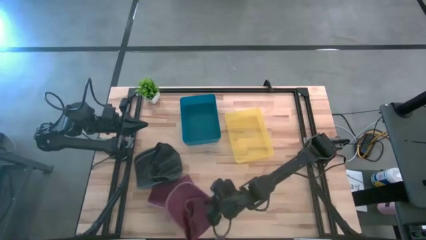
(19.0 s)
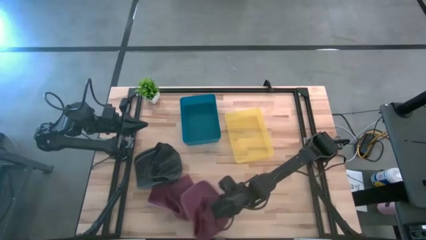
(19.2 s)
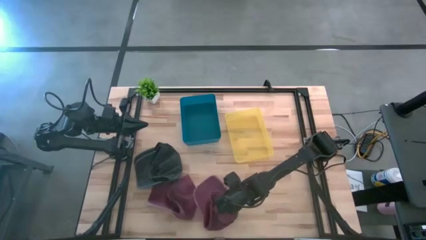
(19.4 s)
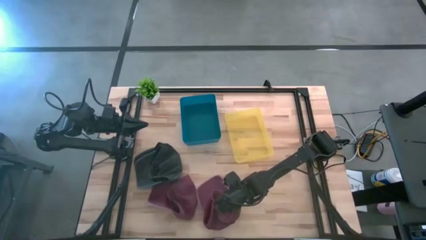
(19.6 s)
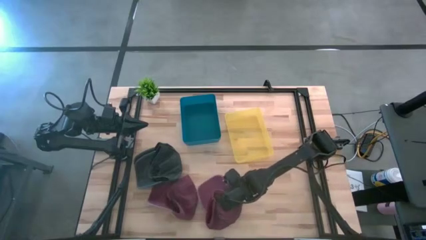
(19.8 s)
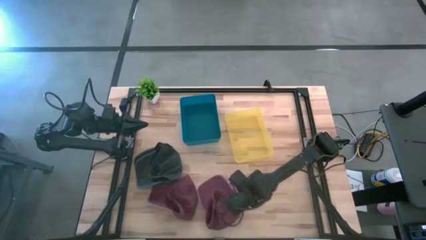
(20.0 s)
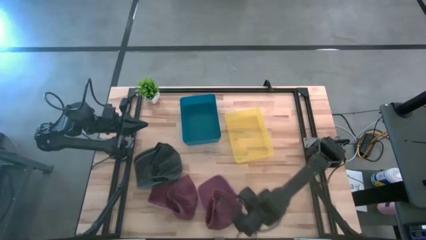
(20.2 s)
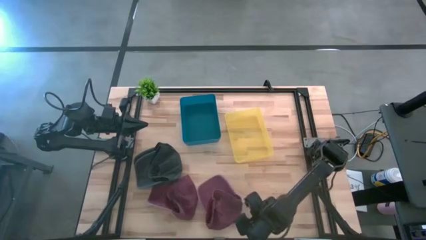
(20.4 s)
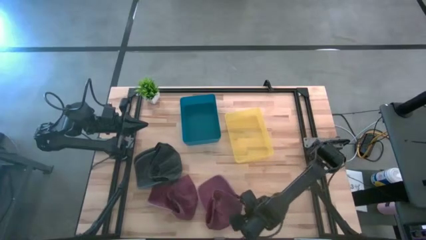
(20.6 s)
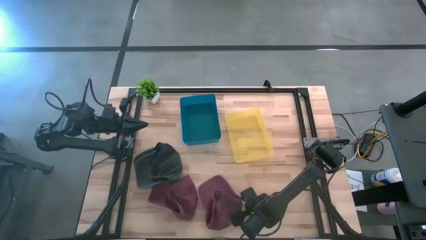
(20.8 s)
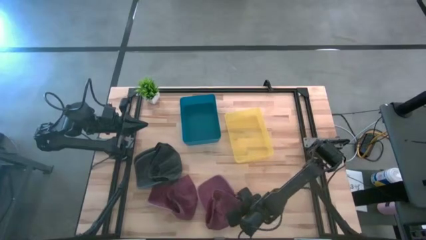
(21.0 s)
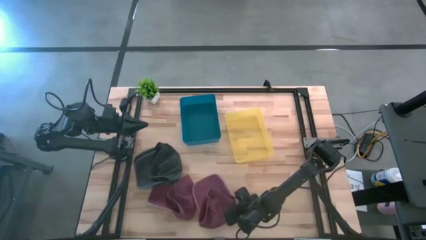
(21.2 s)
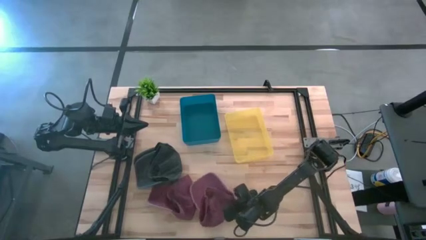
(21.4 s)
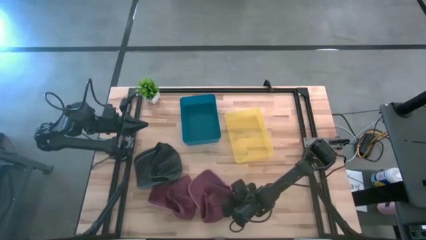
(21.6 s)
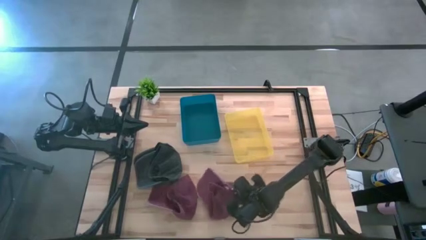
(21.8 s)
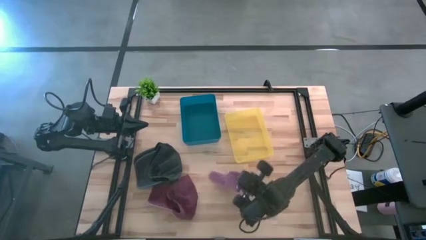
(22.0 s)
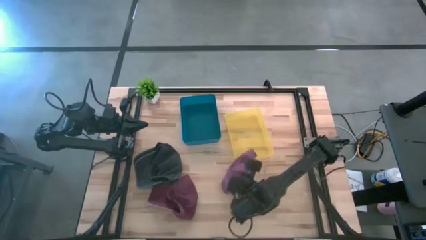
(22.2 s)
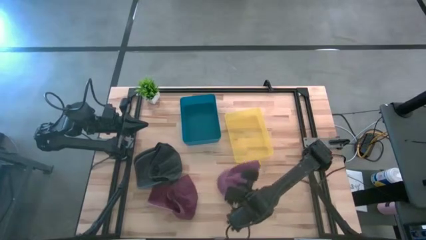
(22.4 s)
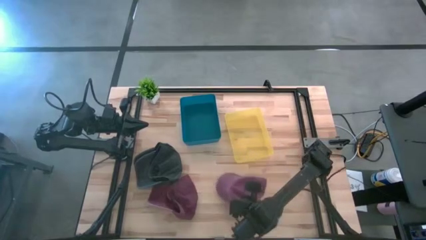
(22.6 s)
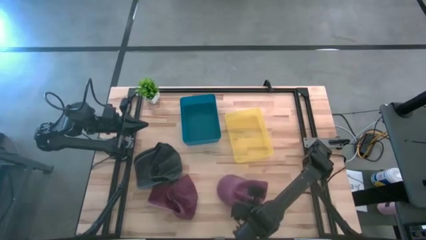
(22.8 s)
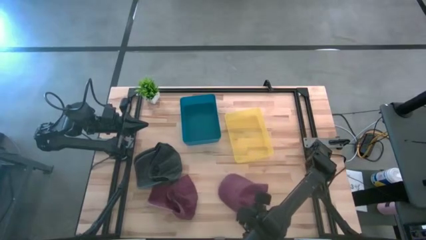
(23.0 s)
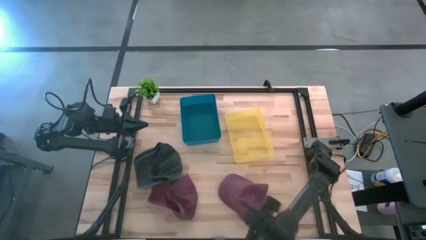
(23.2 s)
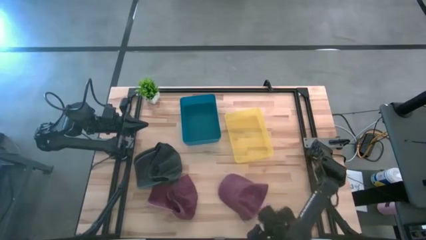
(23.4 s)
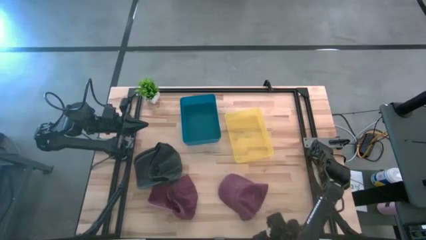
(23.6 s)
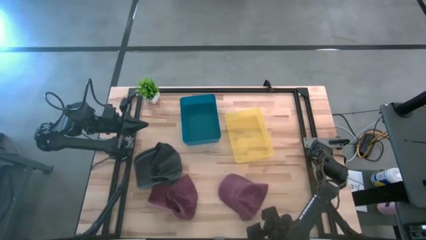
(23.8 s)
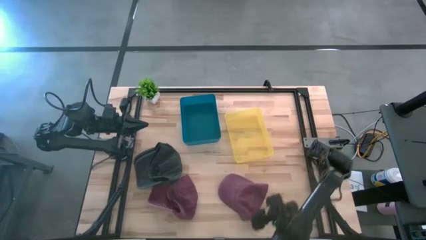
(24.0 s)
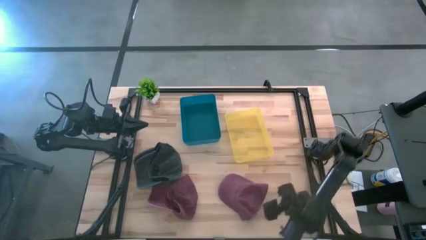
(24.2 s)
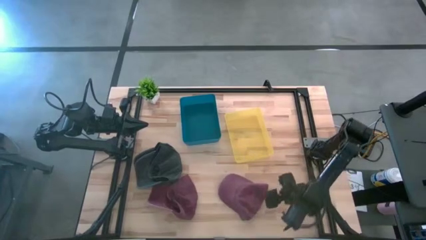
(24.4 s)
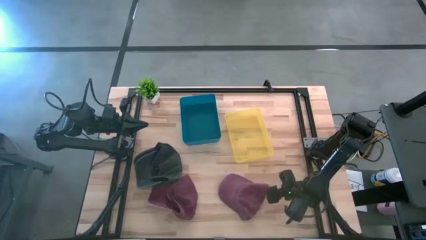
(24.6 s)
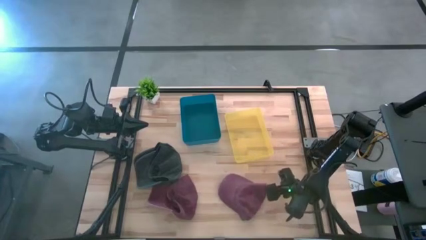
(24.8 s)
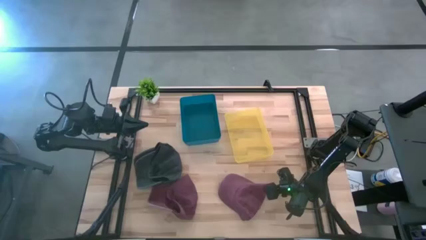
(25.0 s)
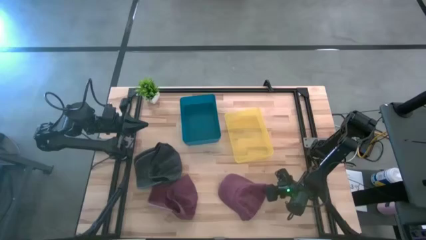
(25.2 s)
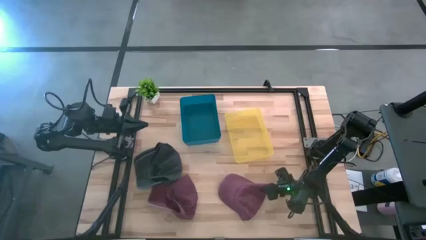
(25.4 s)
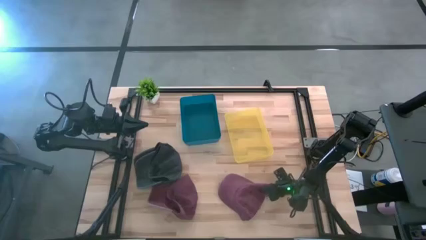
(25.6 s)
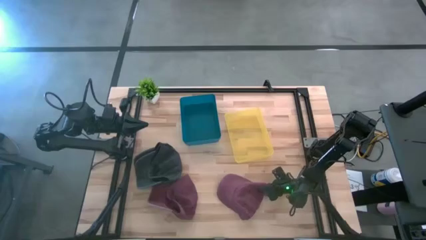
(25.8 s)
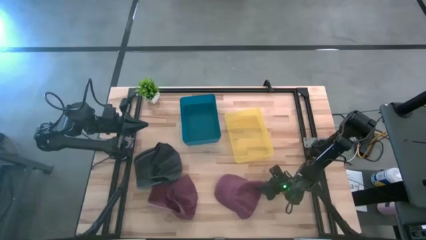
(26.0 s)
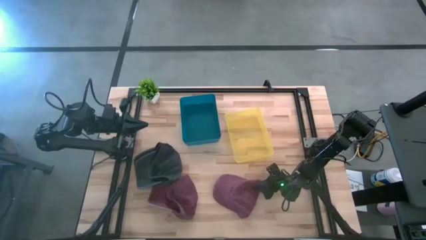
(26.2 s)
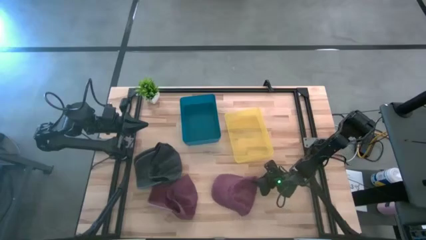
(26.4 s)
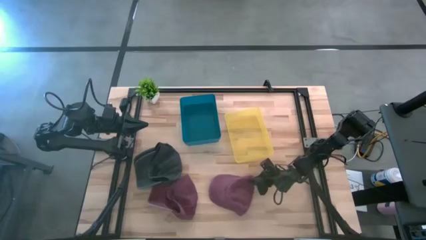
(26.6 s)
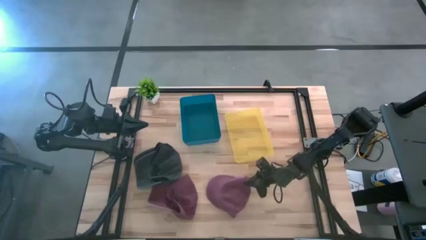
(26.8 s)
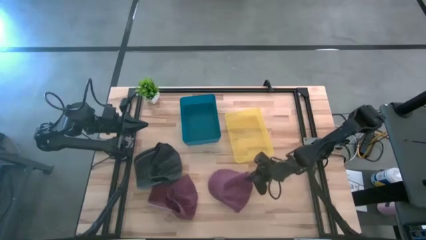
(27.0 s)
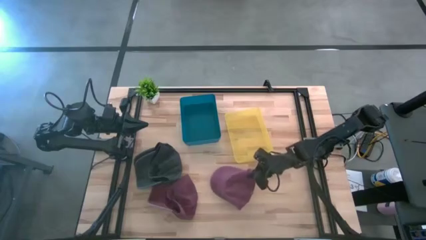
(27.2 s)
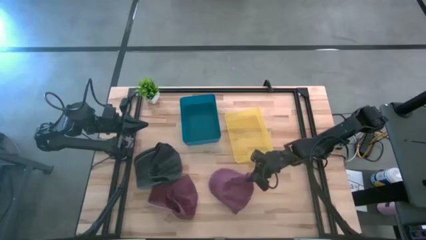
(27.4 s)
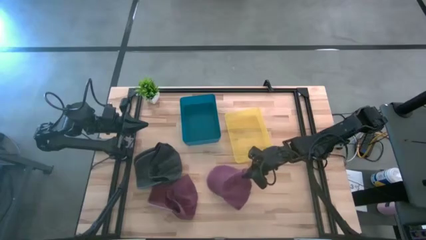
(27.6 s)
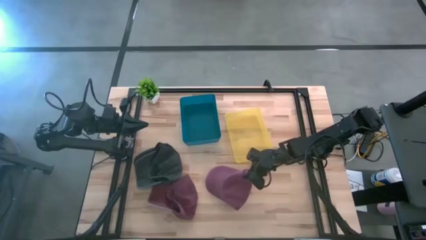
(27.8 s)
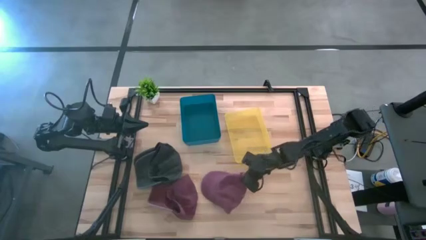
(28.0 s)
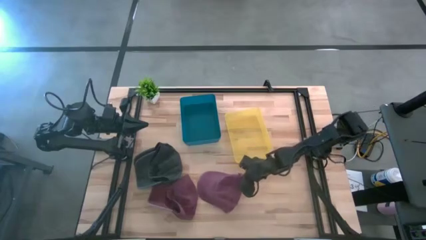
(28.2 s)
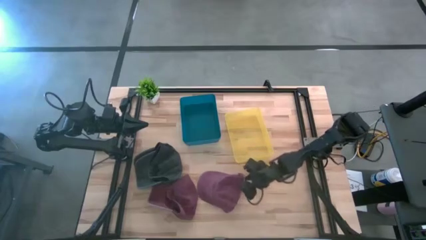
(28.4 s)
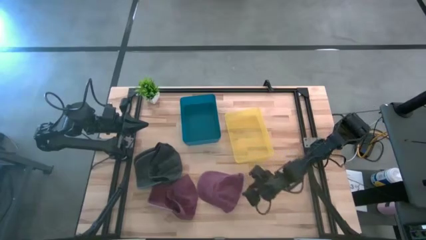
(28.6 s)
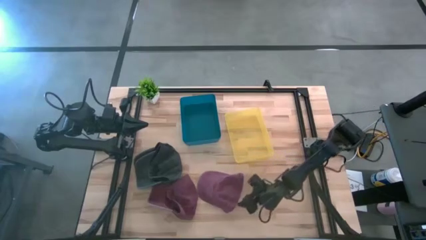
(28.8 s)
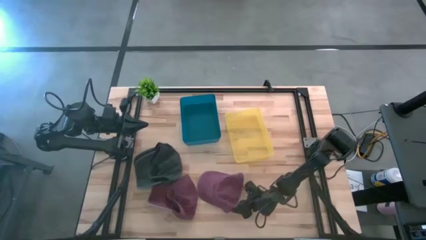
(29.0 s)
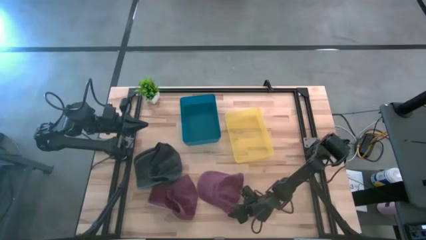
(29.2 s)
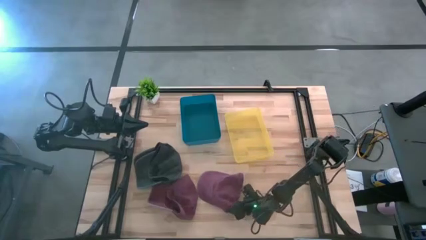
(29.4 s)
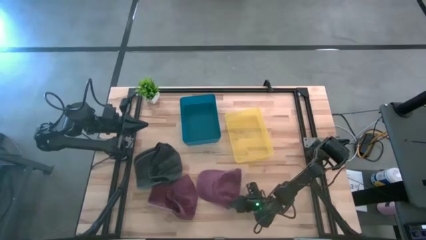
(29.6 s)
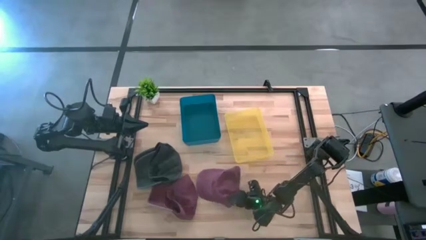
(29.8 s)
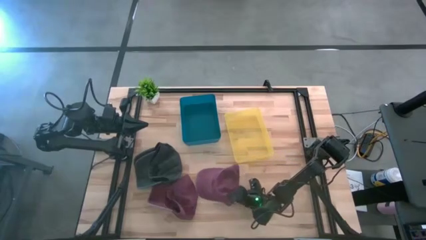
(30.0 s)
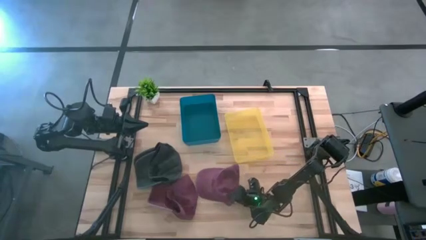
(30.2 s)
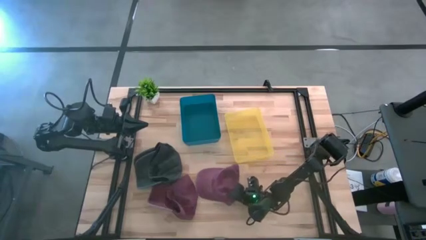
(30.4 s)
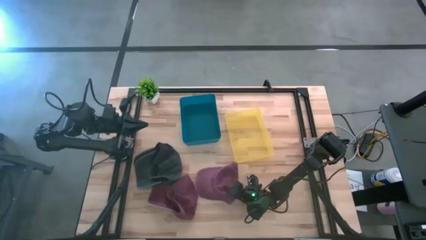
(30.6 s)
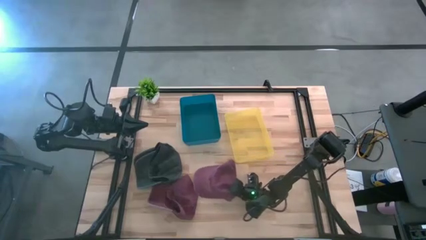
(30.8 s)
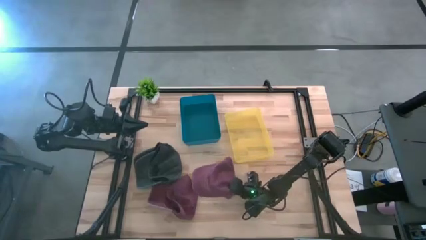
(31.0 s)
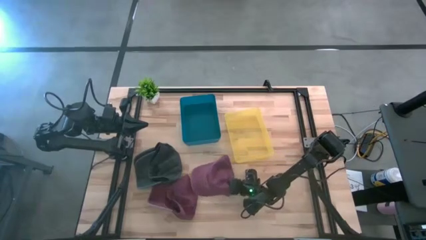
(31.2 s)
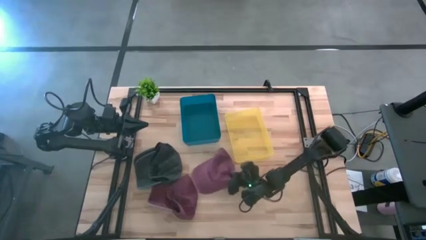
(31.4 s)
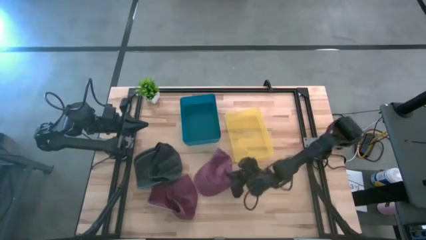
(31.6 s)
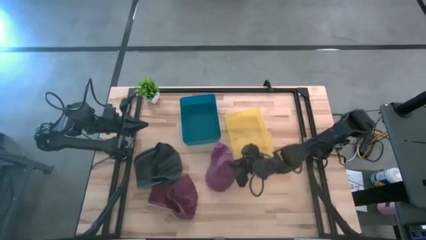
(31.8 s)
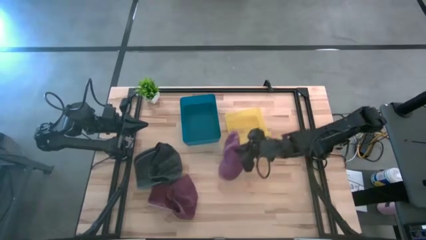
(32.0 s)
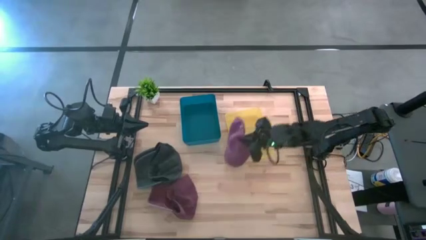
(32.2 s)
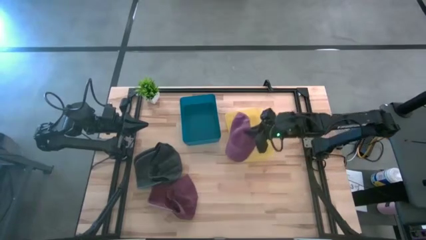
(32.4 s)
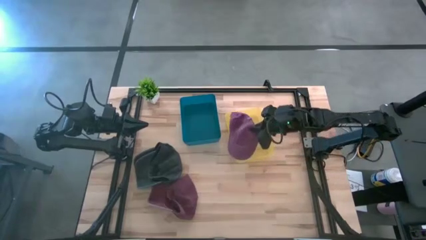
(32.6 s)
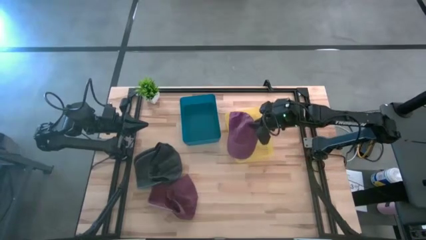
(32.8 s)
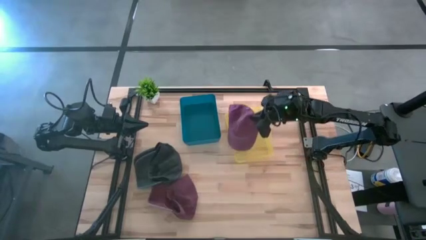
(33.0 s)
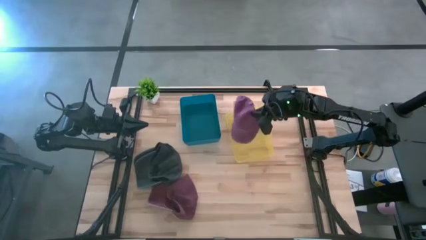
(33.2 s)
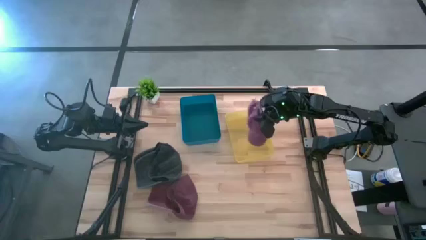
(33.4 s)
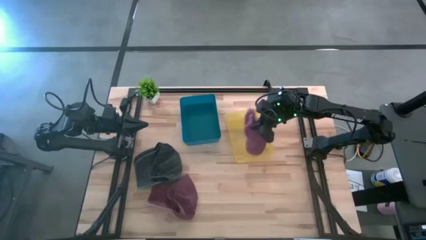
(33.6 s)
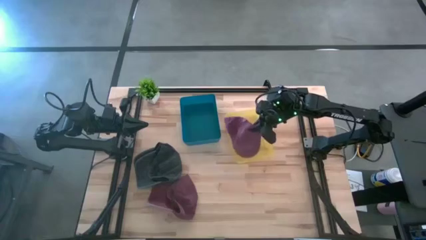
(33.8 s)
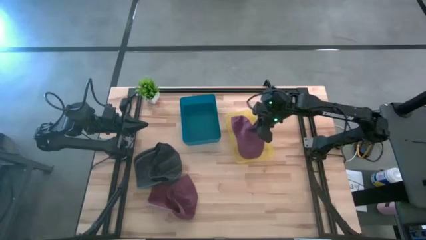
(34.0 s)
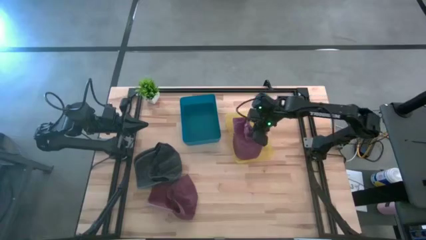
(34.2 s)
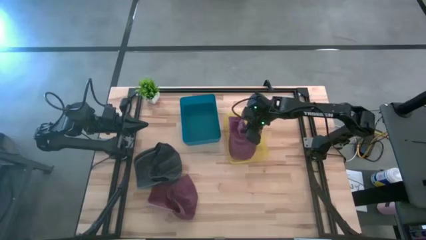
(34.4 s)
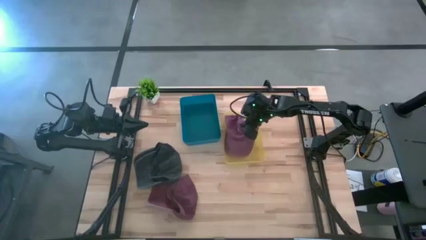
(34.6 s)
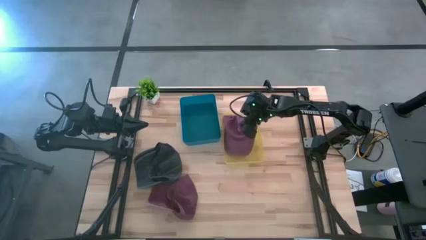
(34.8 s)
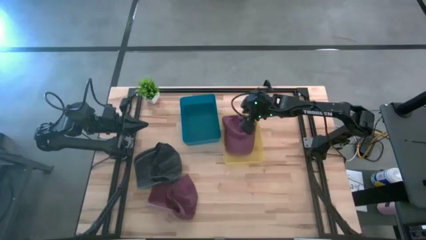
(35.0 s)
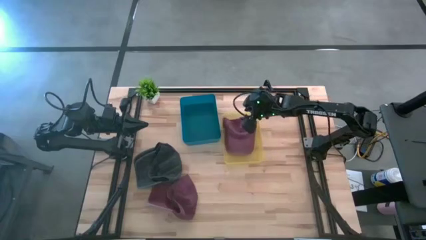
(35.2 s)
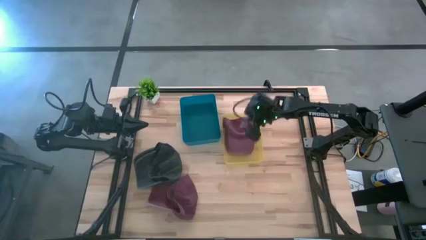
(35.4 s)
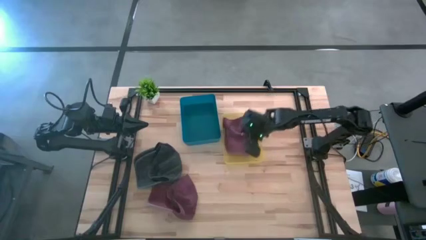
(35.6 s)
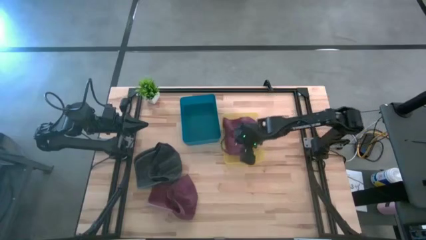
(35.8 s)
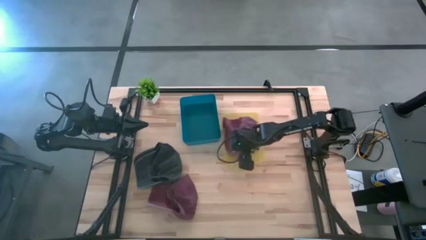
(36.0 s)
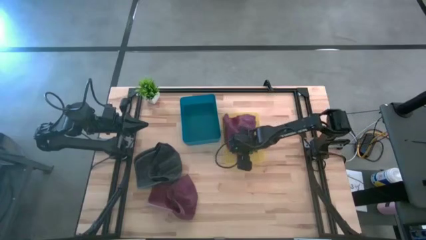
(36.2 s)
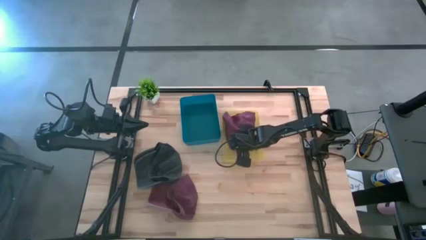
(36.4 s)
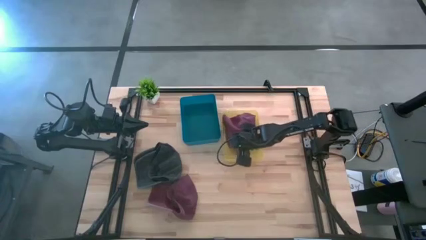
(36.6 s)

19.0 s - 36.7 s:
Task: Pick & Place hat
Put the top red cap into the yellow bin
